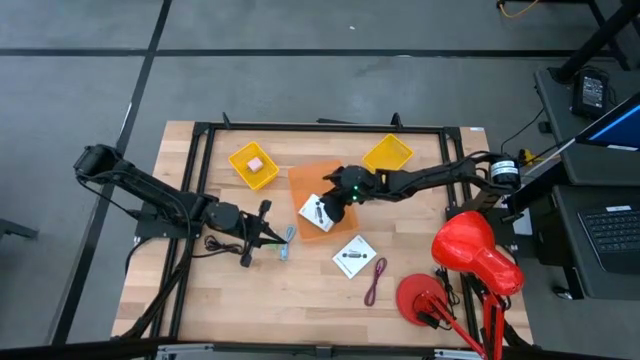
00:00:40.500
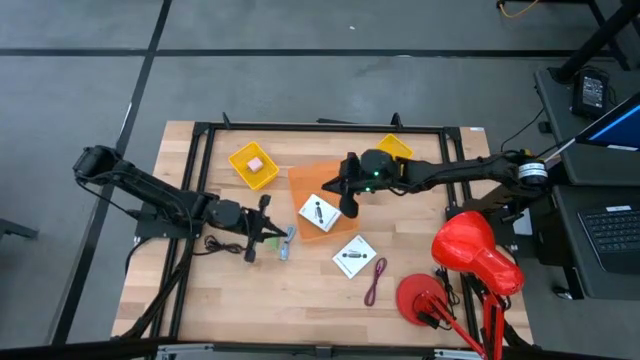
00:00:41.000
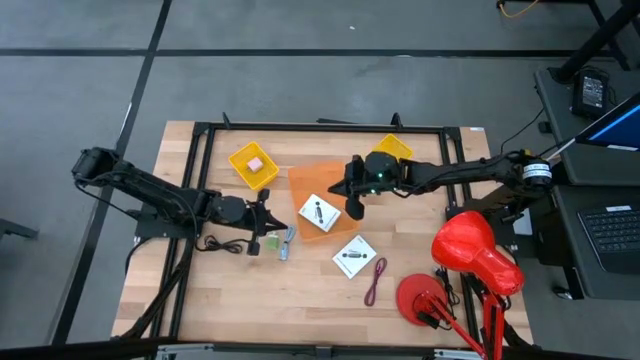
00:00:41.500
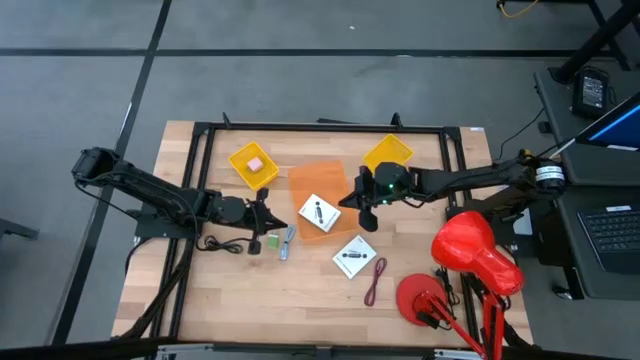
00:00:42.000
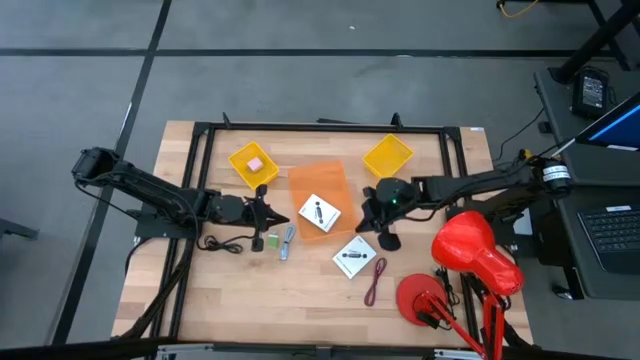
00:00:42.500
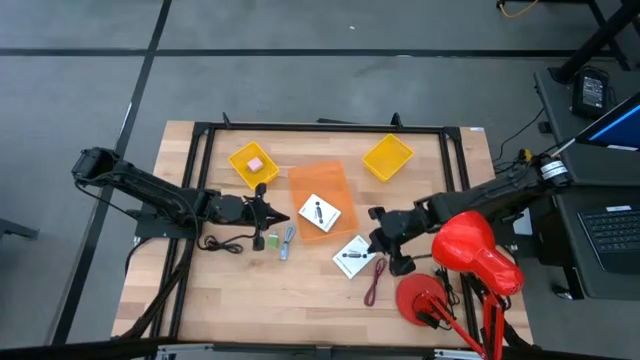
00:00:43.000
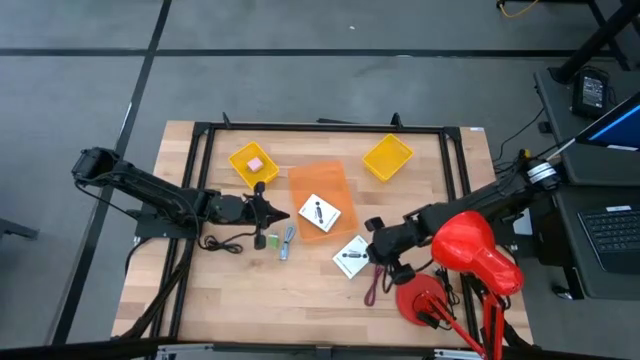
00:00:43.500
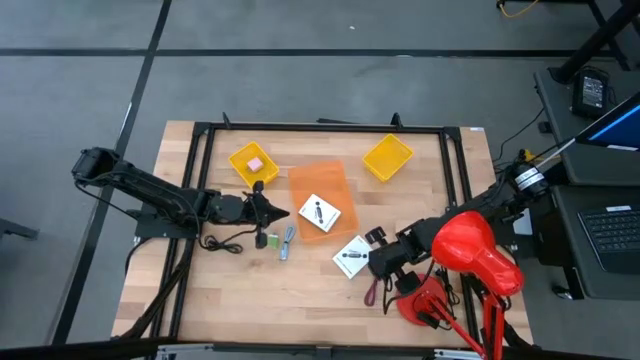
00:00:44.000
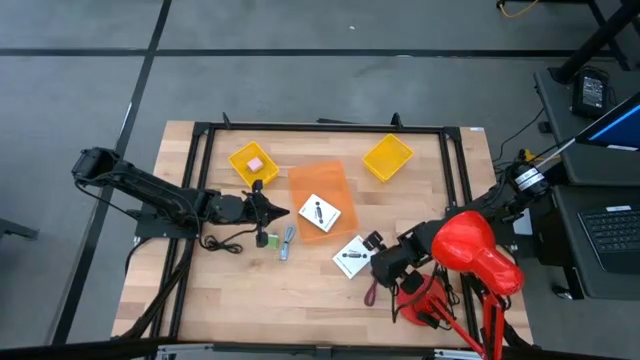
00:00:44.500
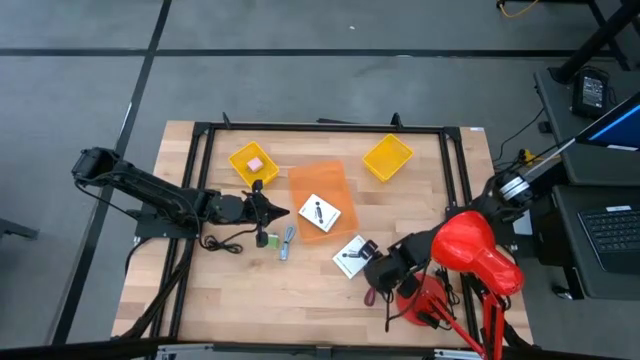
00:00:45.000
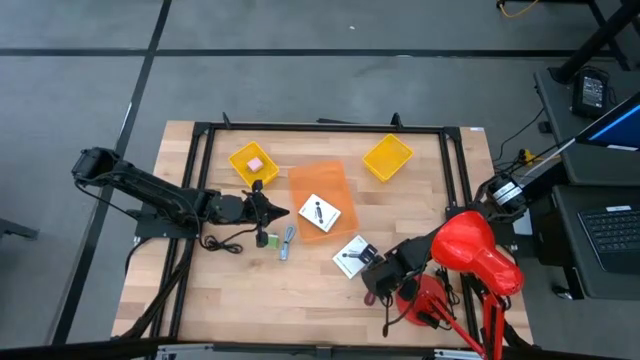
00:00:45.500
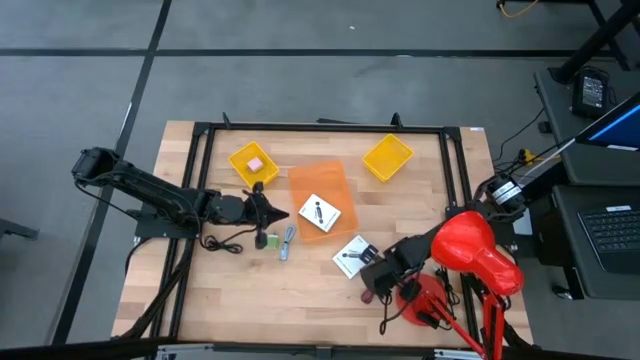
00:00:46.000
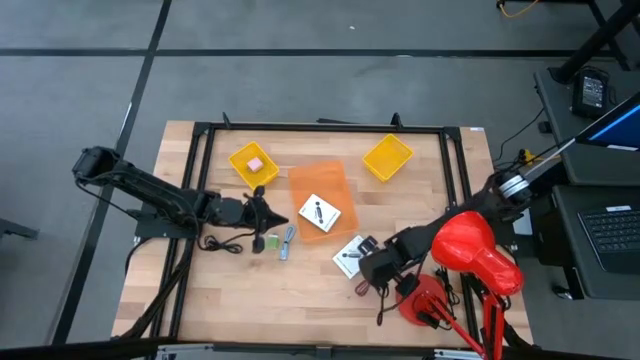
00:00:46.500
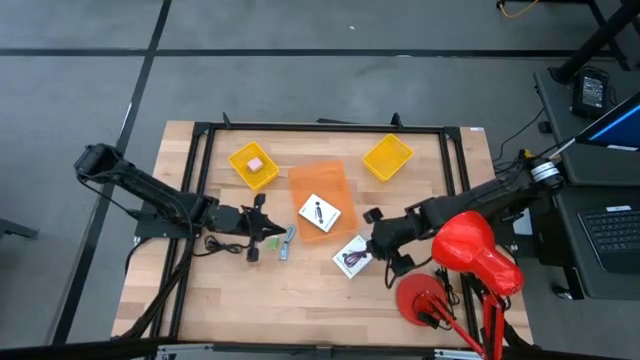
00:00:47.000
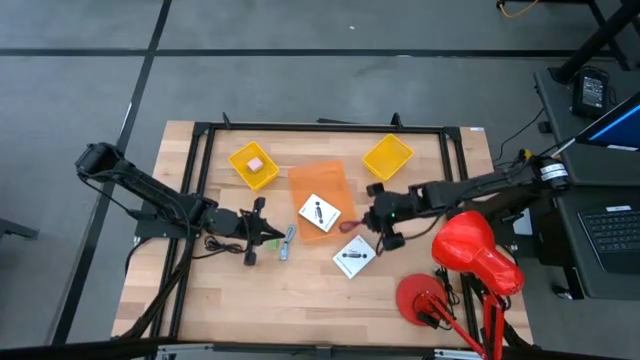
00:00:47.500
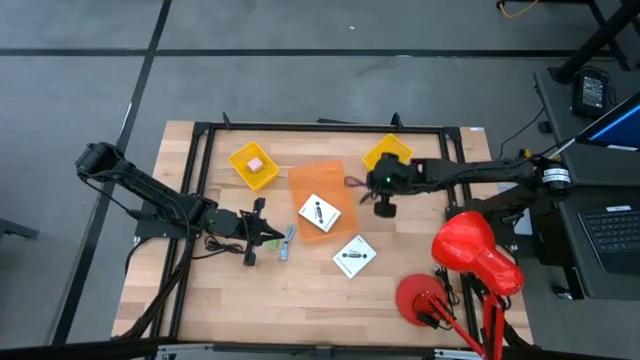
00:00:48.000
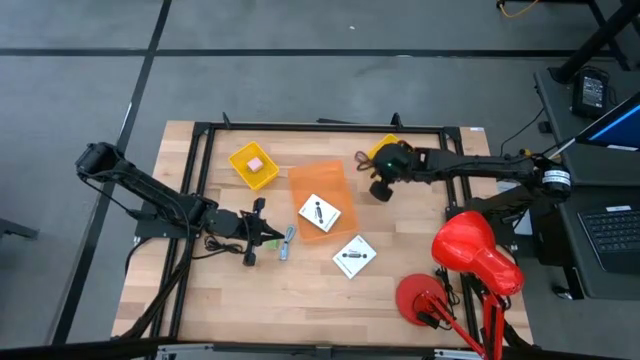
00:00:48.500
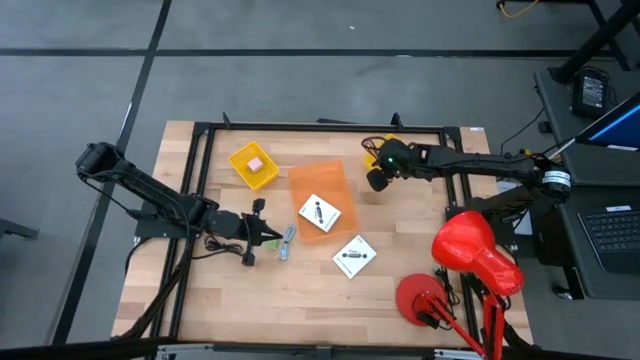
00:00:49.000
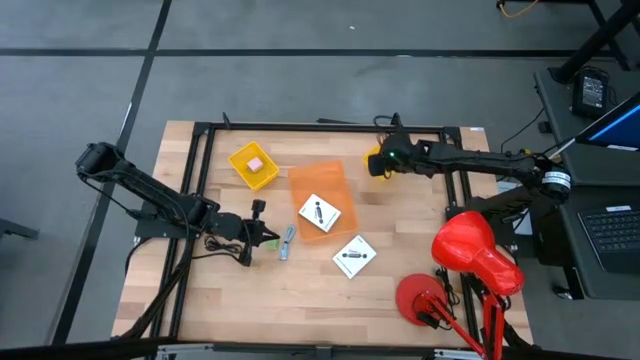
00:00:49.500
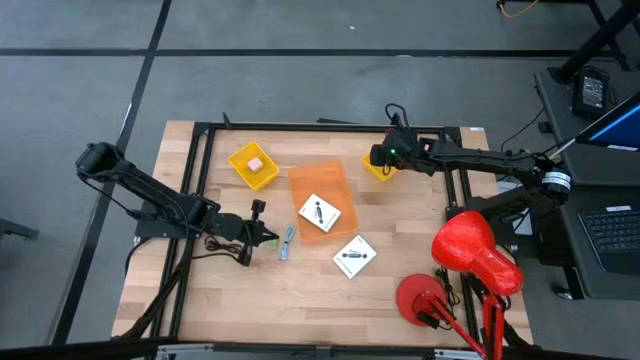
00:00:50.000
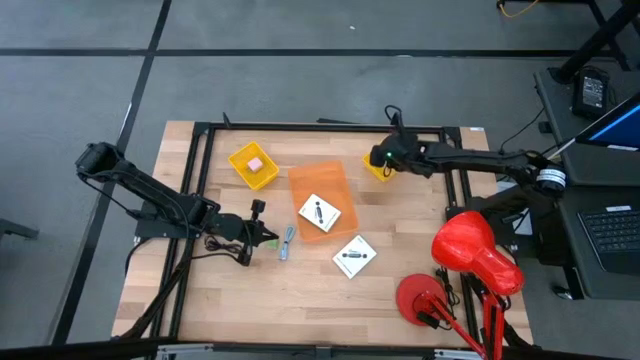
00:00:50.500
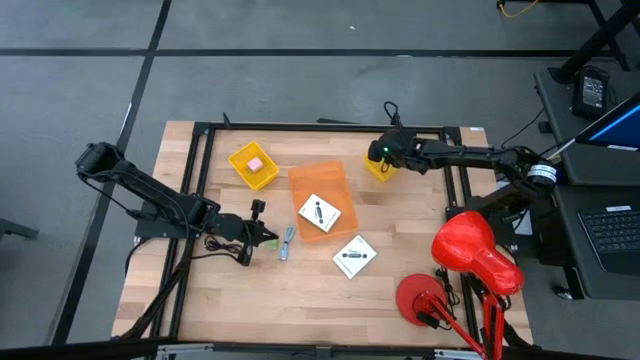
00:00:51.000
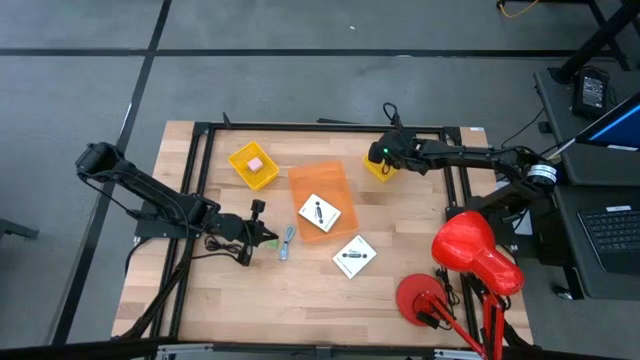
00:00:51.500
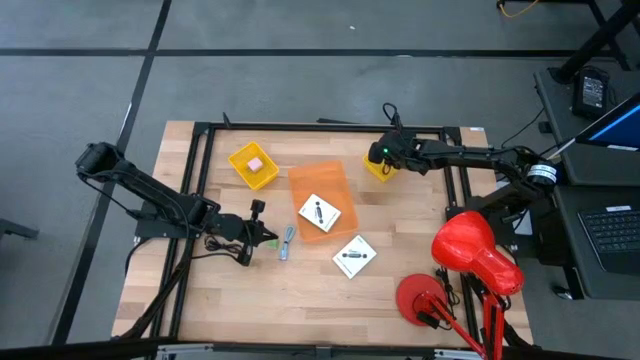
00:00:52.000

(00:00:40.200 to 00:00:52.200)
Task: Pick and place items into bin
Put the pink charger cable into the right yellow bin

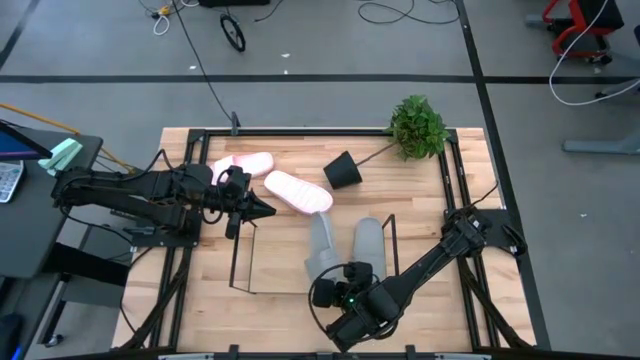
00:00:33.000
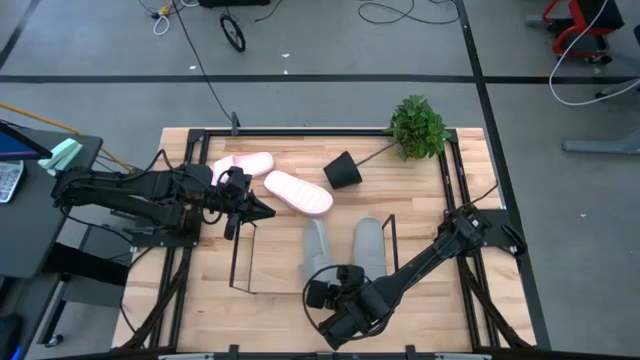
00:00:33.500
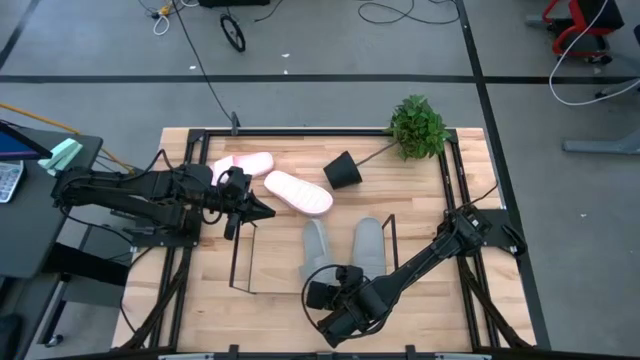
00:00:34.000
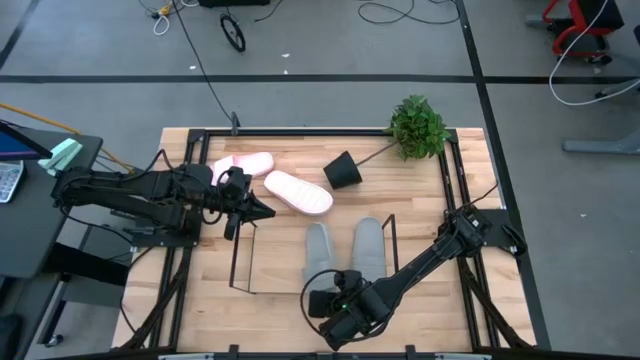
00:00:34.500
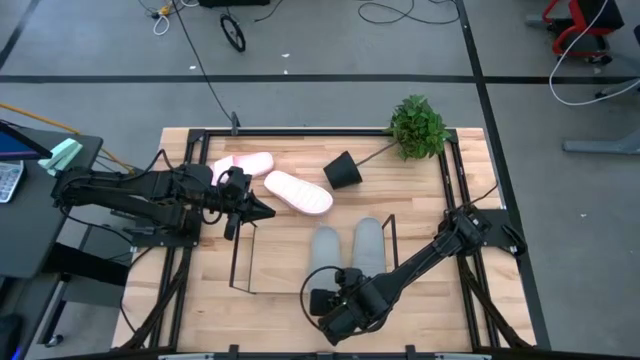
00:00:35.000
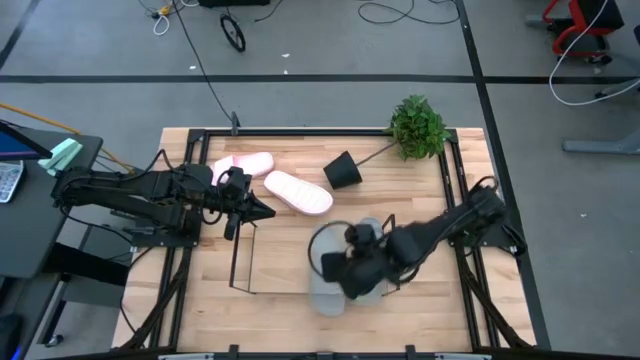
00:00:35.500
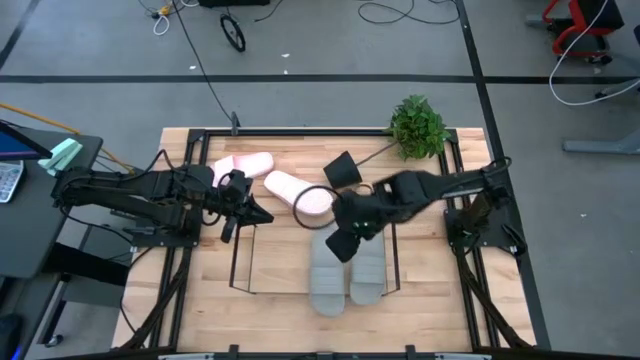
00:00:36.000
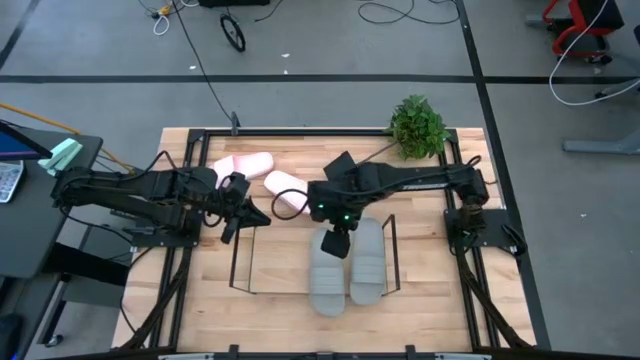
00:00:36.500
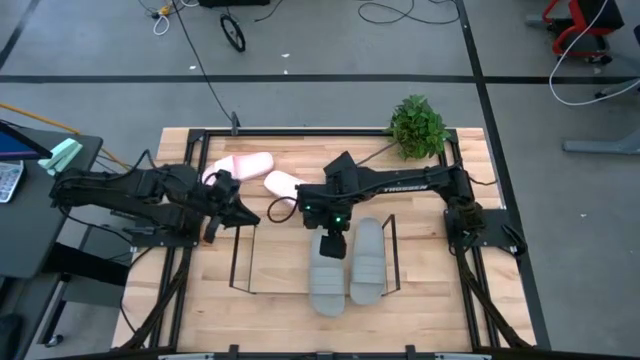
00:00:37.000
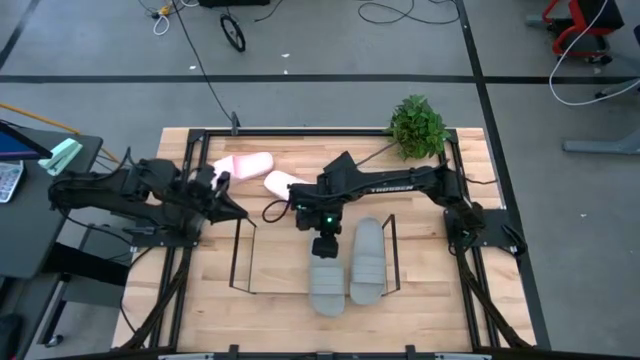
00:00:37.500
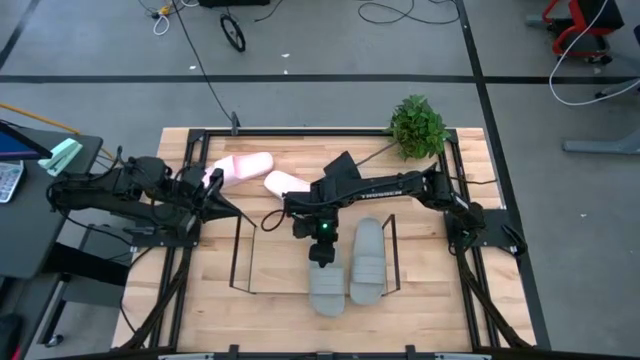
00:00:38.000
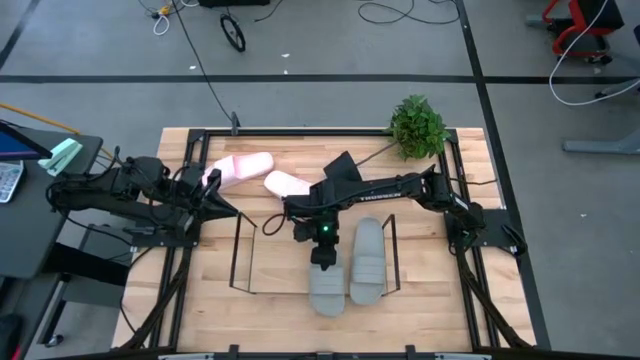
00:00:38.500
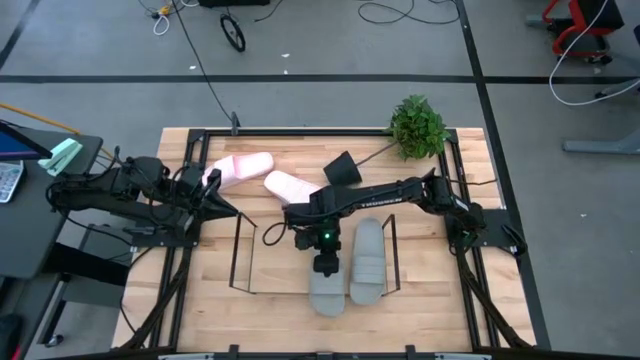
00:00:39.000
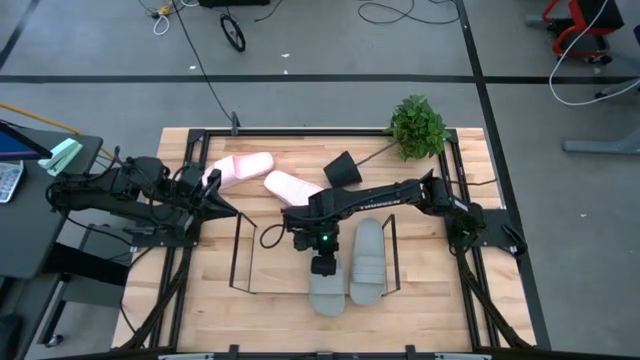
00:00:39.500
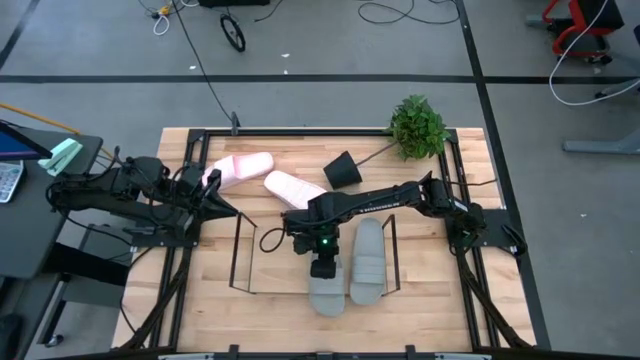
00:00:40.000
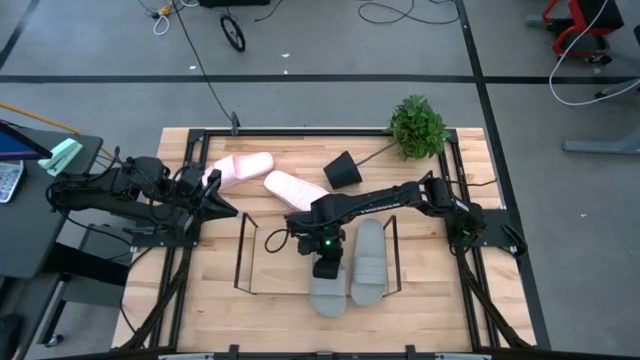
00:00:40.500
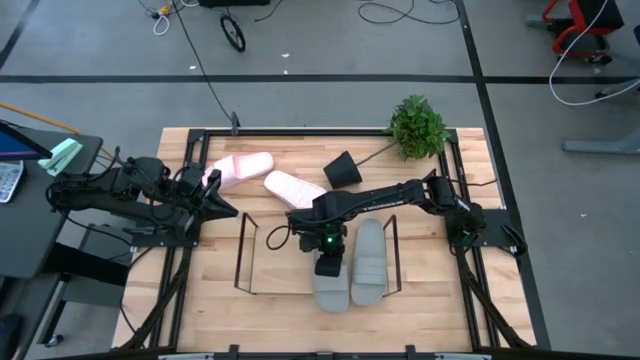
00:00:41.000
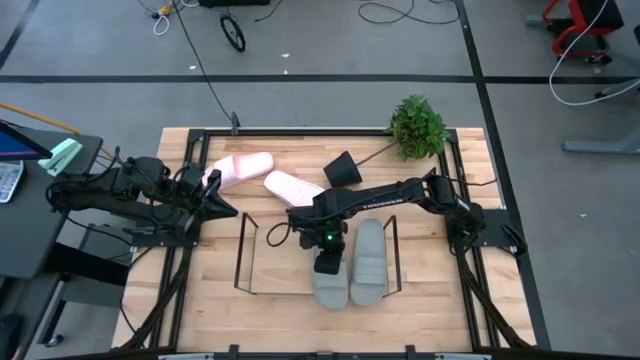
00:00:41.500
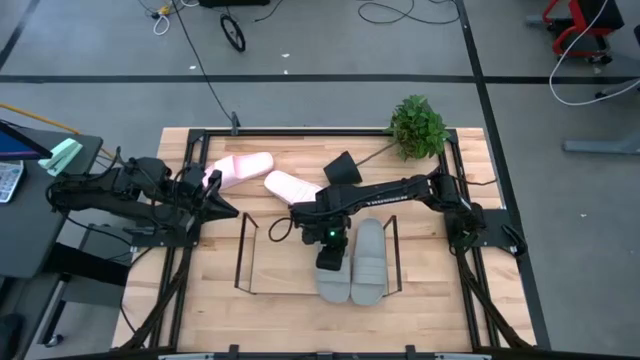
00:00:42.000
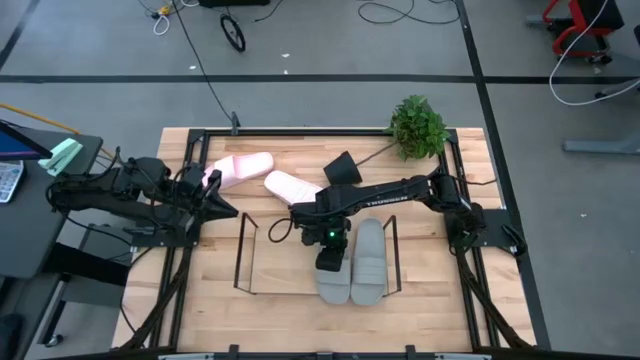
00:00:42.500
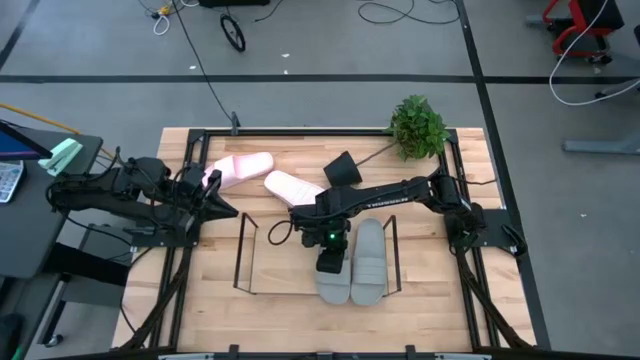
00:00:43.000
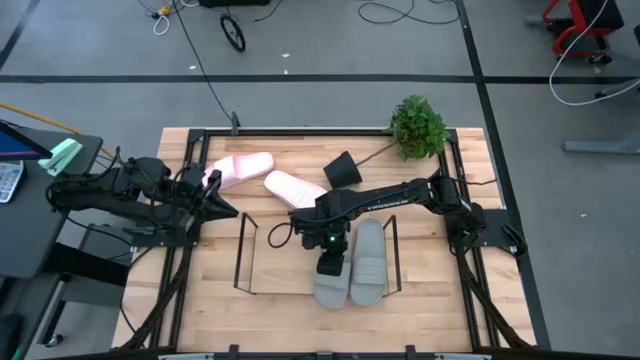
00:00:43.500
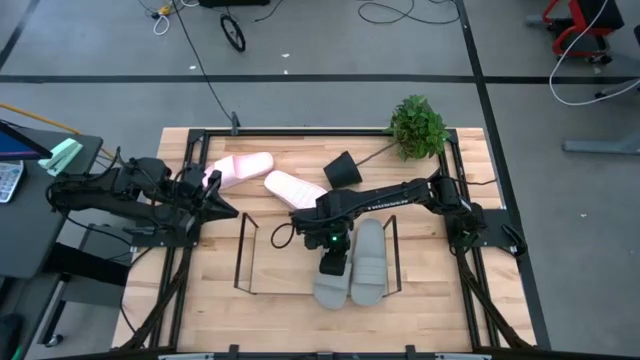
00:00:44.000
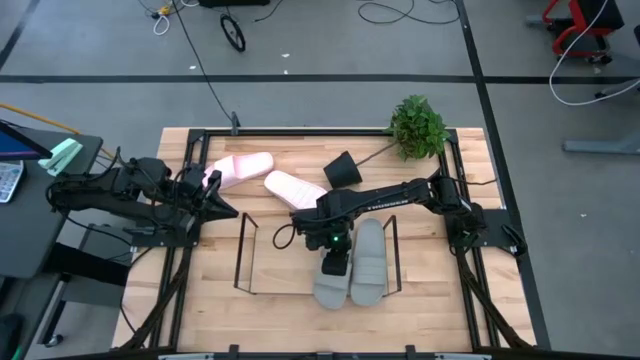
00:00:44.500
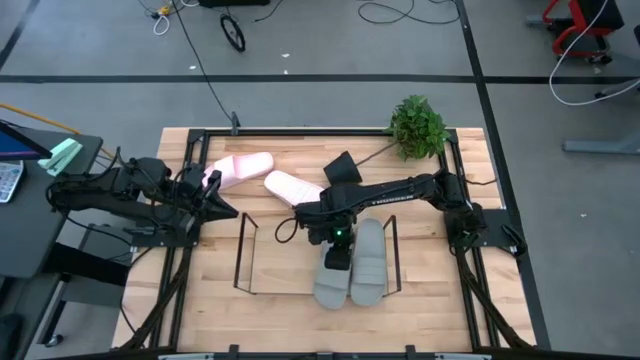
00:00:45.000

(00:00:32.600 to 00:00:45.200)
Task: Pick and place slides into the shelf
Align the gray slipper with the other gray slipper on the shelf
